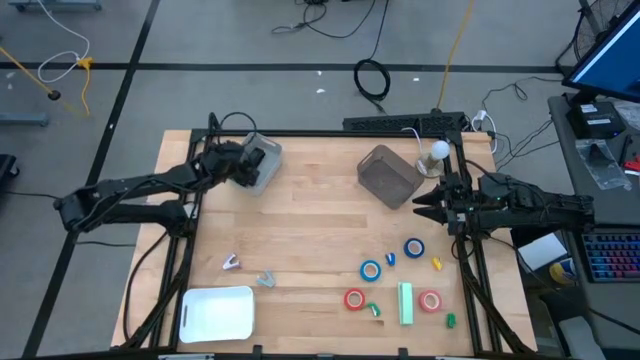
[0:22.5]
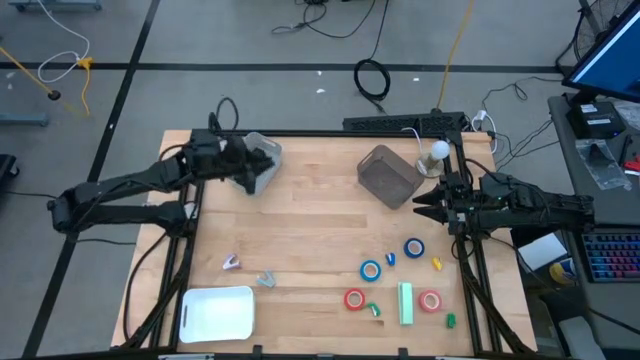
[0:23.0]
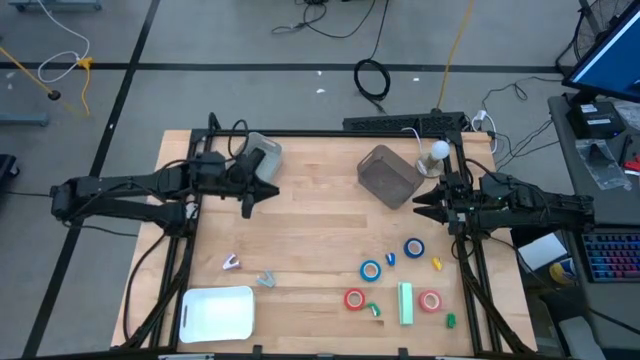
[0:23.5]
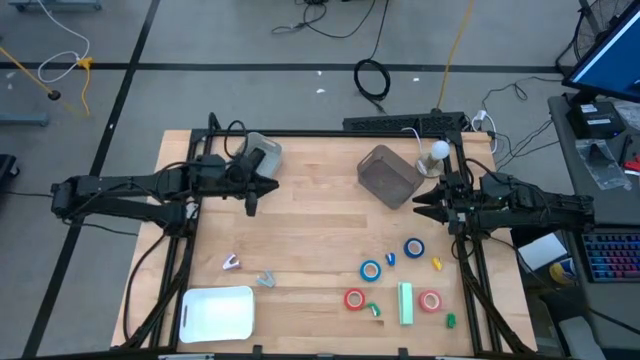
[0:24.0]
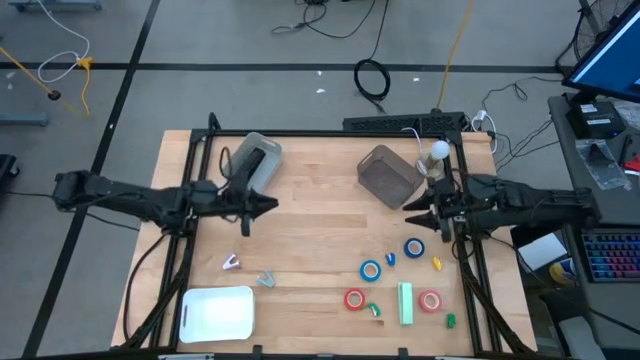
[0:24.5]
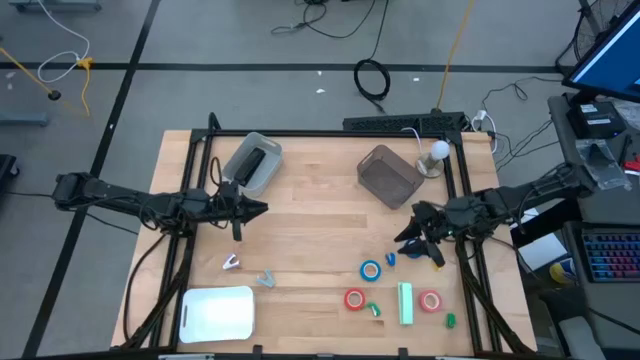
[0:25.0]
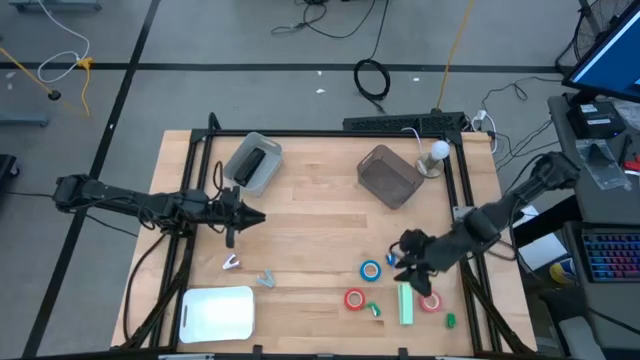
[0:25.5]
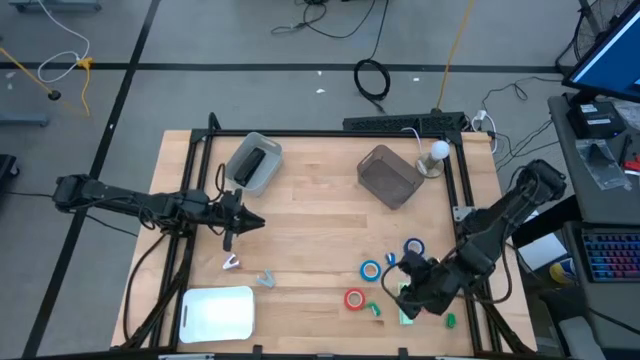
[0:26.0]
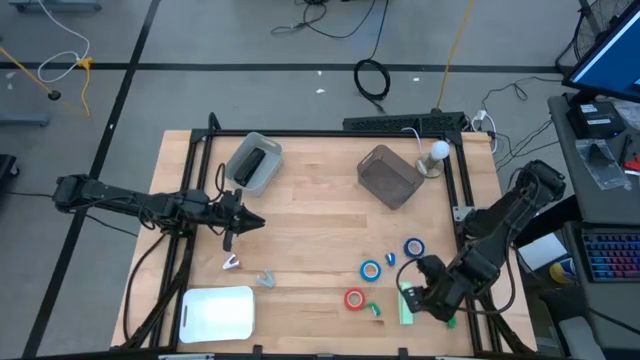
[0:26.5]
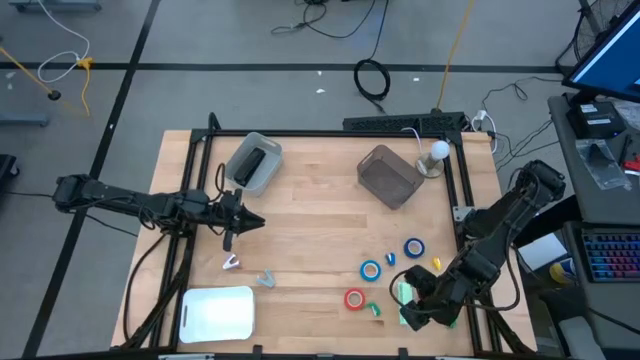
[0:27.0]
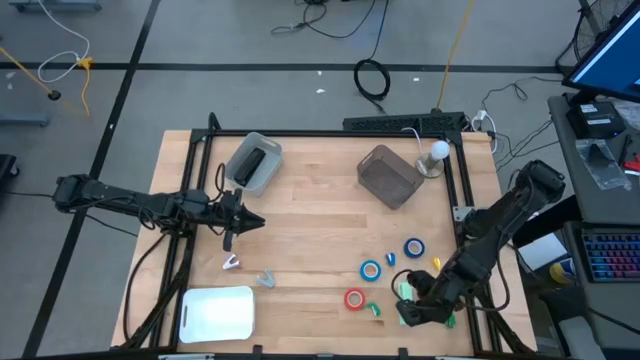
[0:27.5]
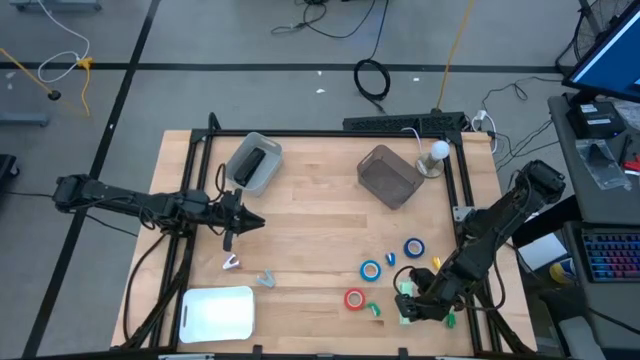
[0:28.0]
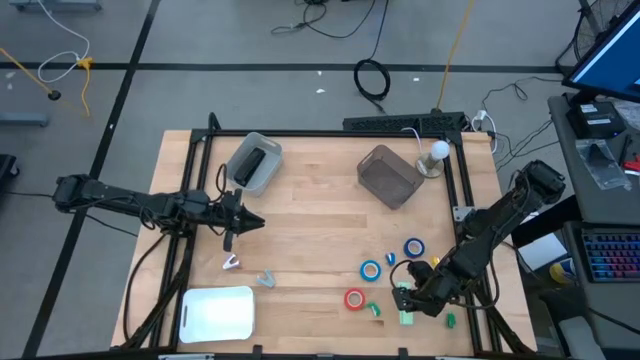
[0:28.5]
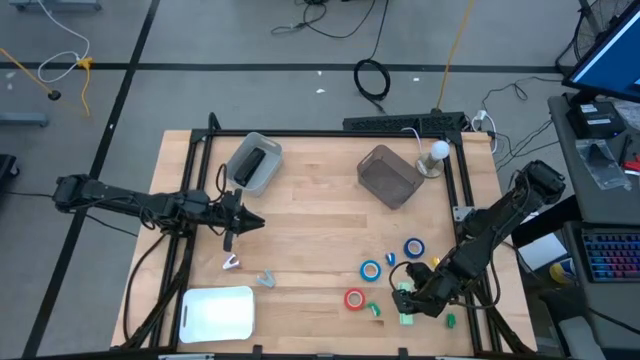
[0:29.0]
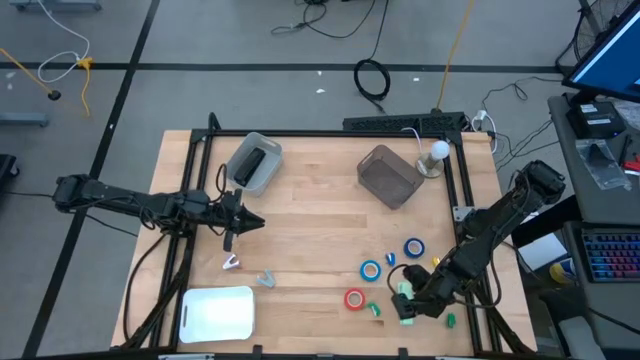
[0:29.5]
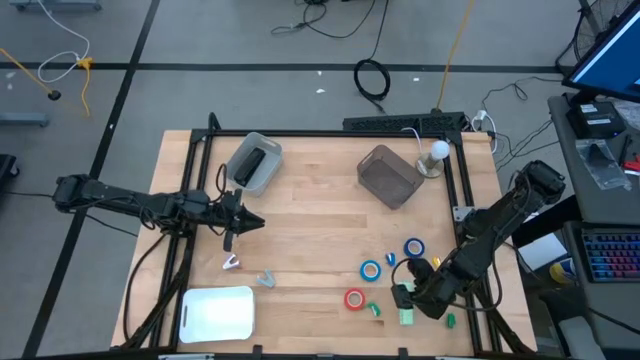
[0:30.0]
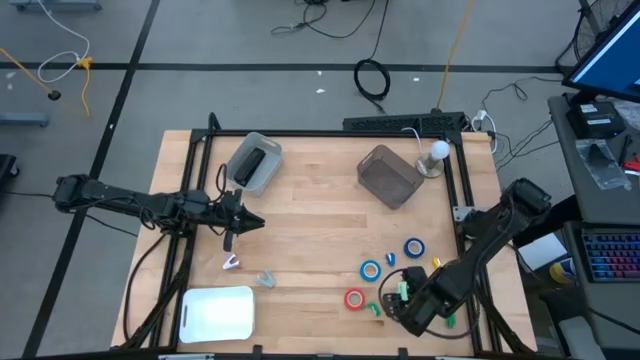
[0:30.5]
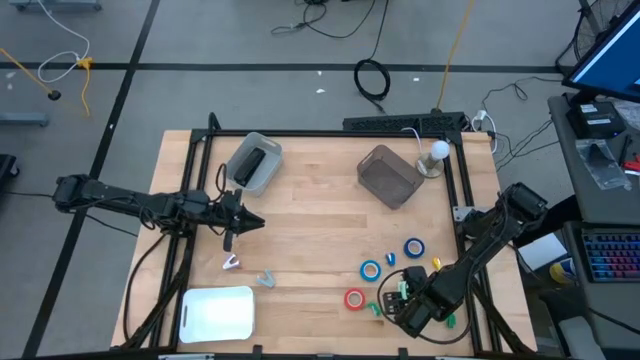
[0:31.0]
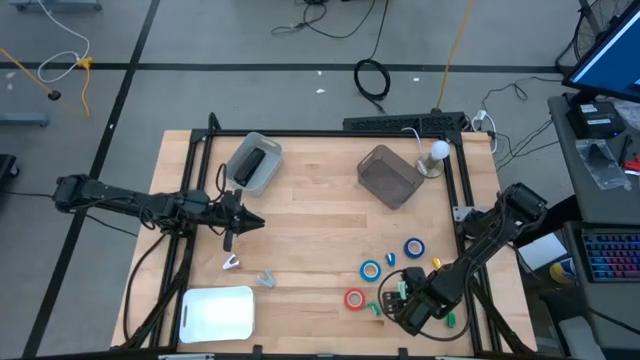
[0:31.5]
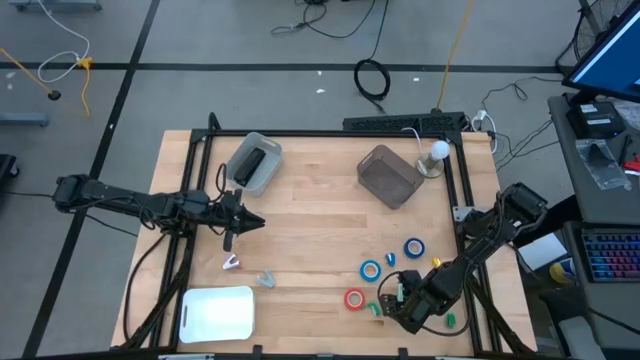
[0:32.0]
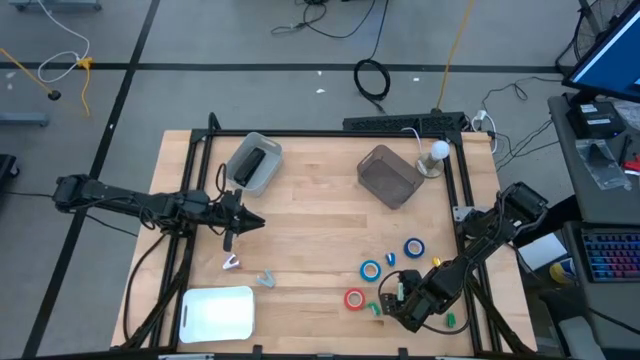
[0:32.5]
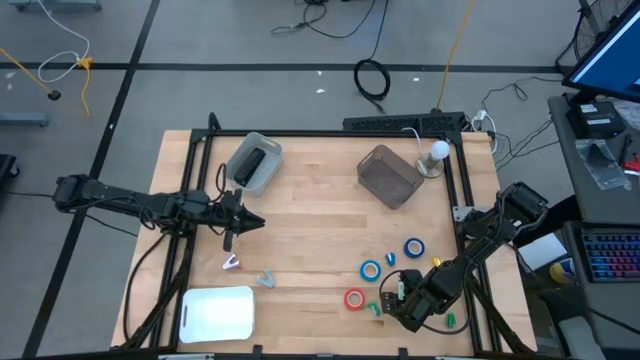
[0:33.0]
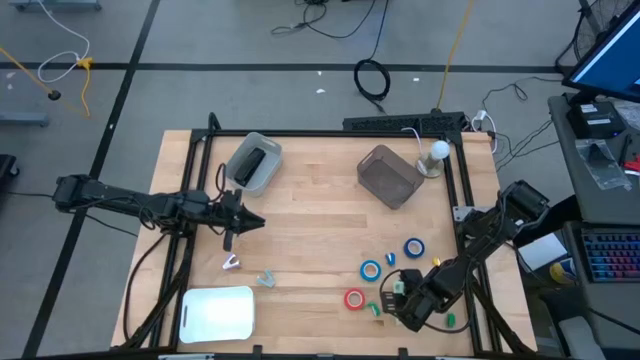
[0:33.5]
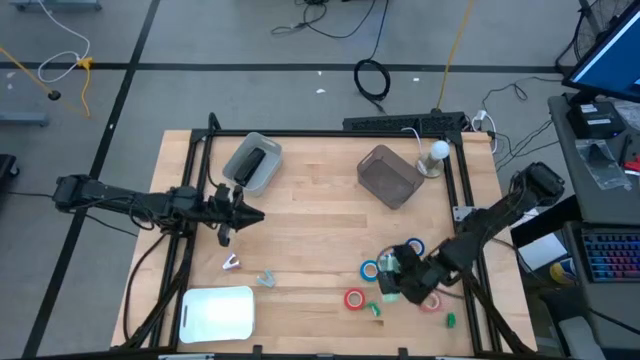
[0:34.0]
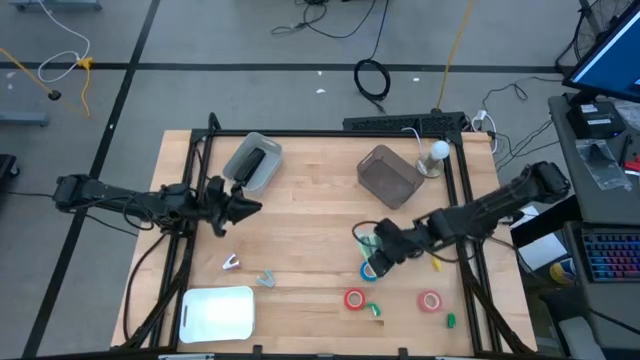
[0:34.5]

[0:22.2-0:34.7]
Task: Pick and place Stapler, Stapler remover, tape
Put the green stapler into the gray bin

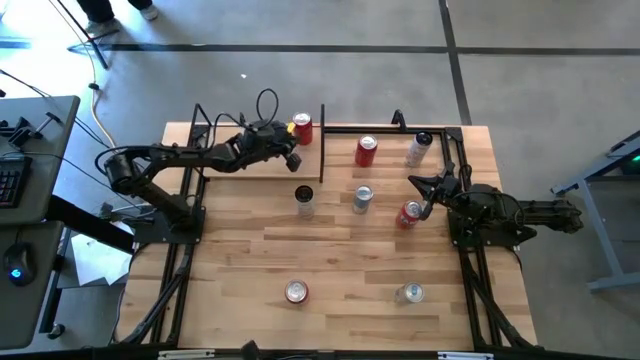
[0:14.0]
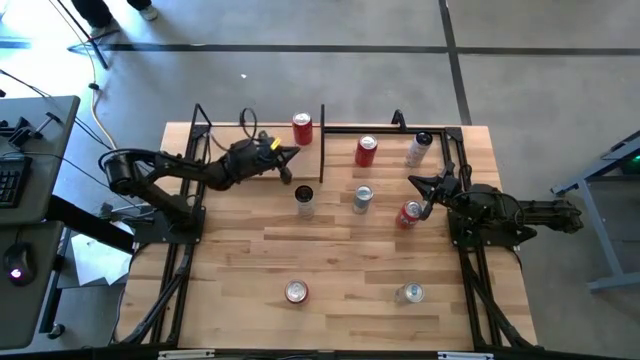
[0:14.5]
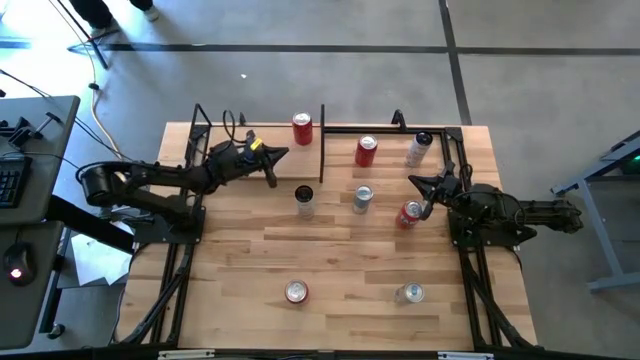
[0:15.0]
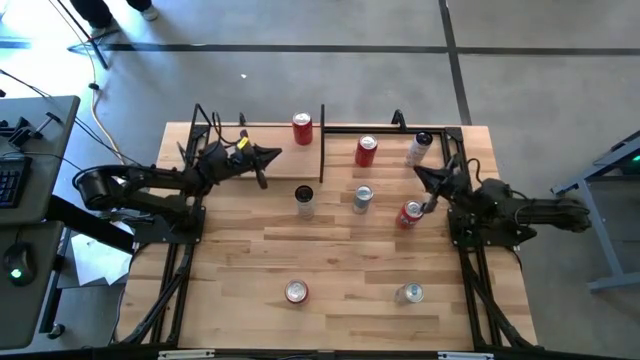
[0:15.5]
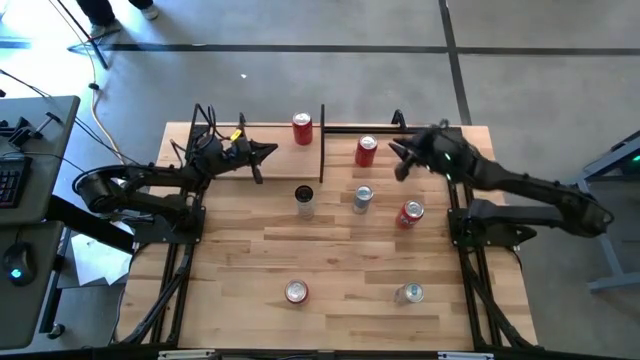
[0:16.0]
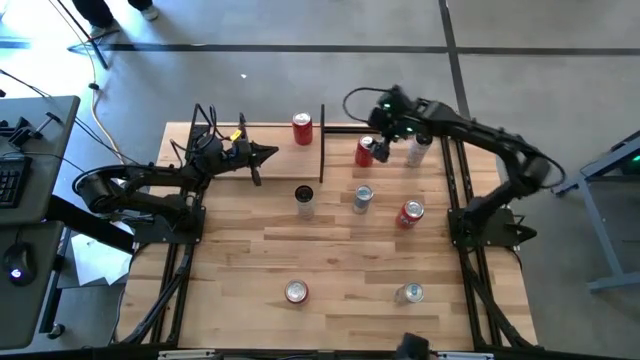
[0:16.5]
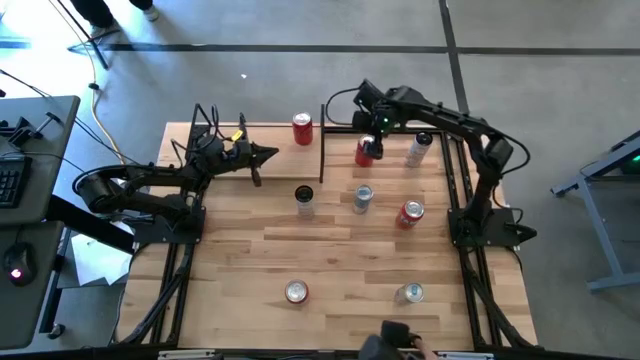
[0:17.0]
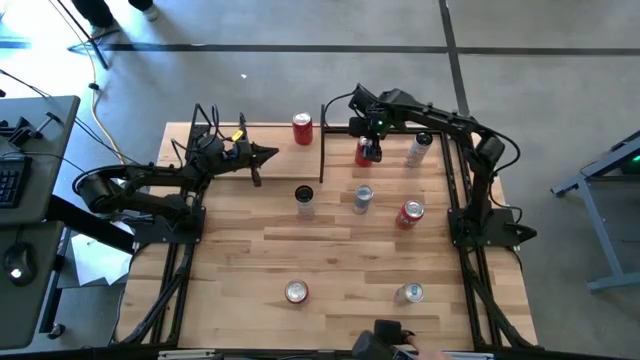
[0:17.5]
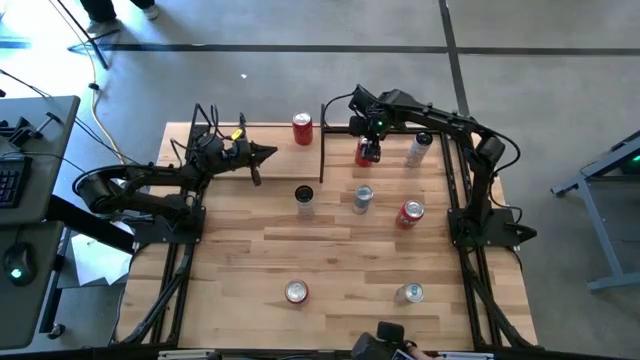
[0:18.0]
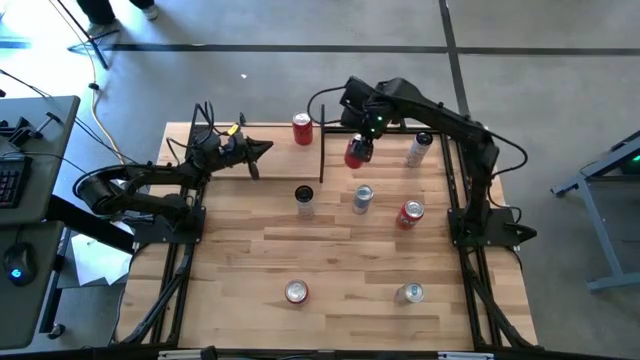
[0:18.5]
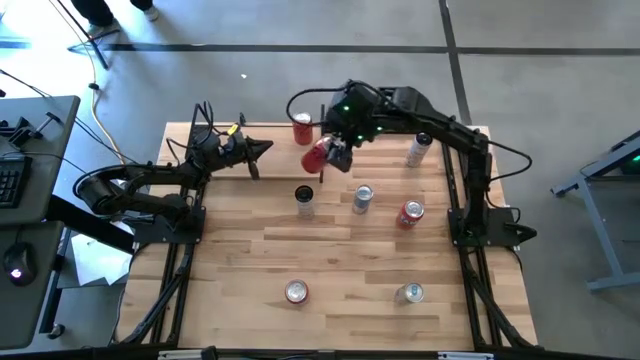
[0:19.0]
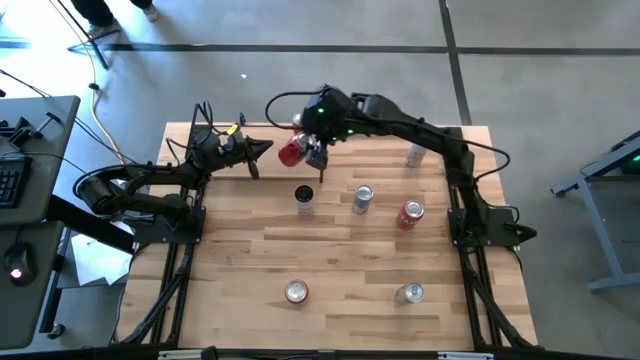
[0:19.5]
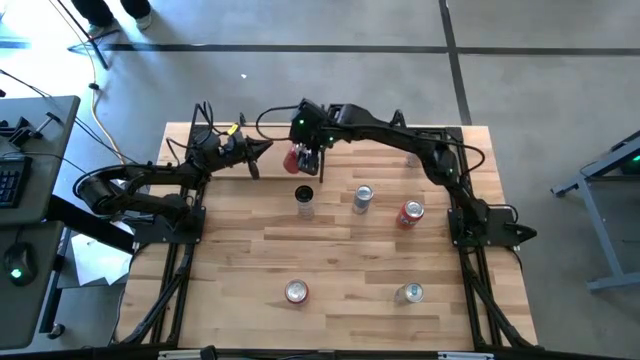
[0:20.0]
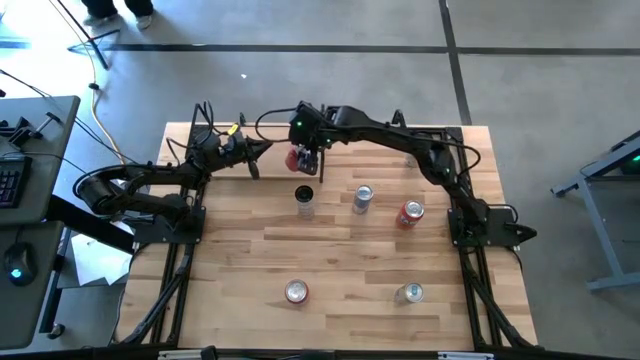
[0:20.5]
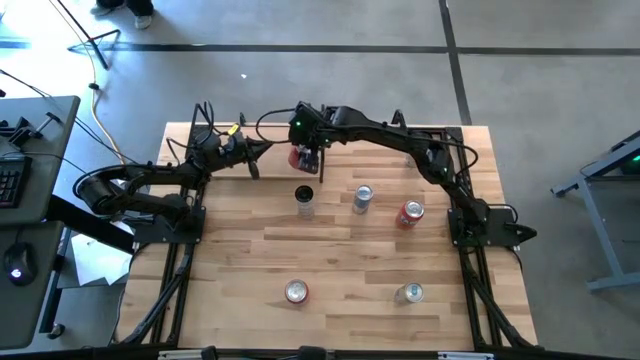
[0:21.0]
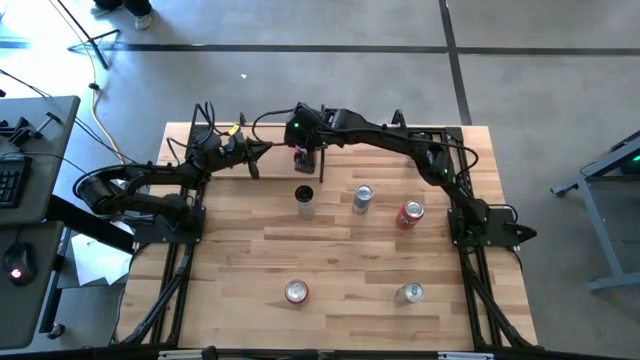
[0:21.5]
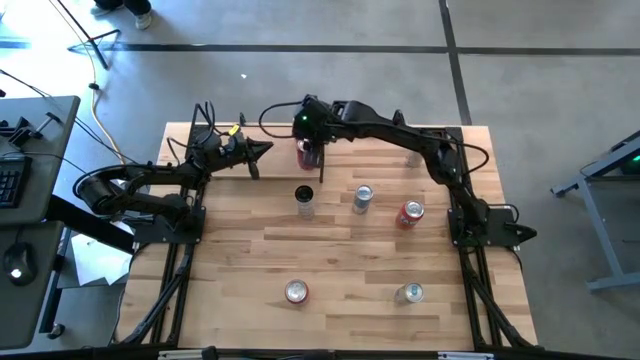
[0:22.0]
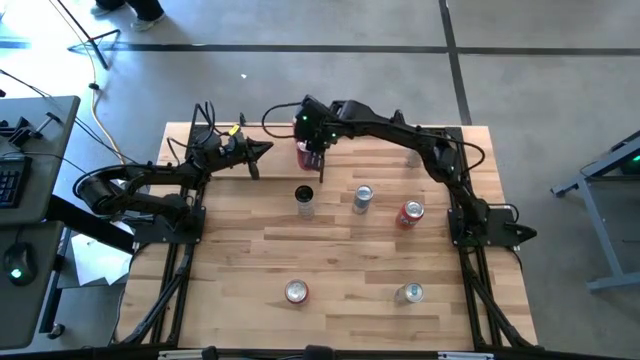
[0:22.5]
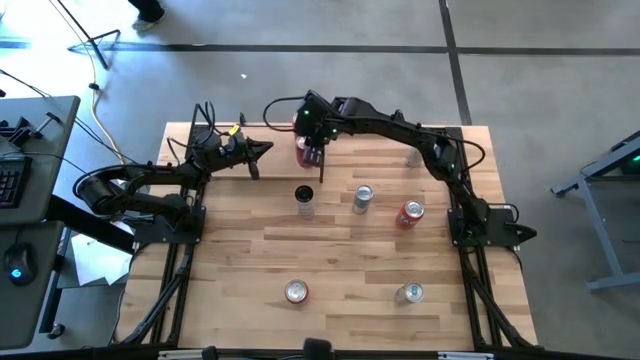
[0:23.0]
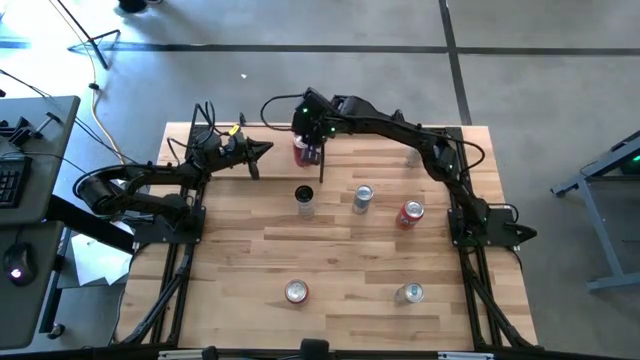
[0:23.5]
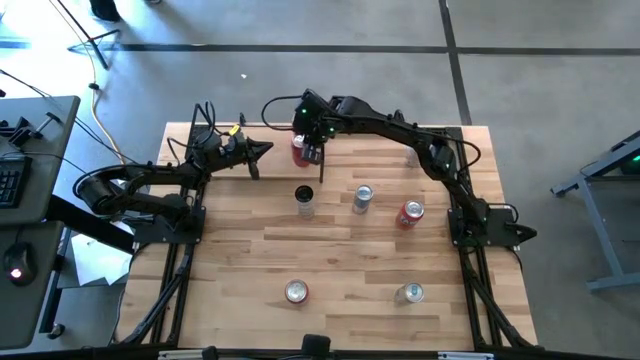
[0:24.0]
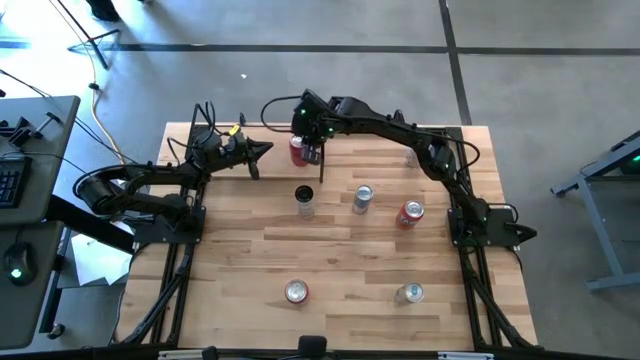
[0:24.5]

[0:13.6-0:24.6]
Task: Place canned beverage on shelf
Put the red black soda can aligned with the other red black soda can on the shelf
